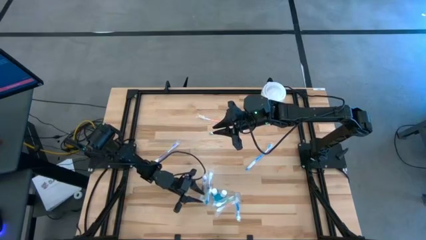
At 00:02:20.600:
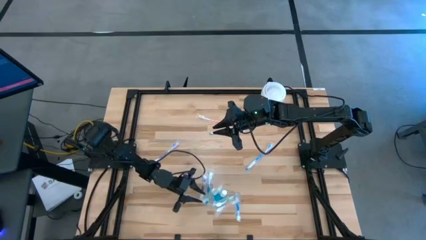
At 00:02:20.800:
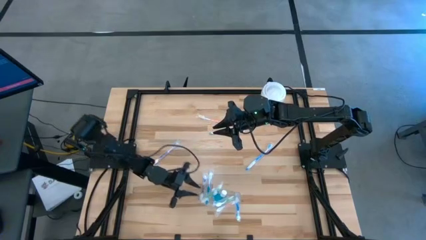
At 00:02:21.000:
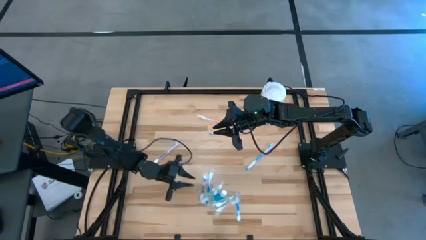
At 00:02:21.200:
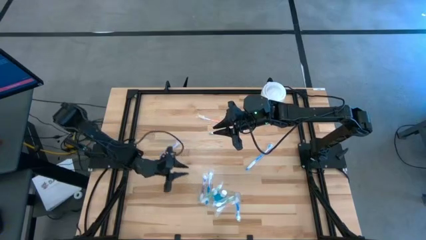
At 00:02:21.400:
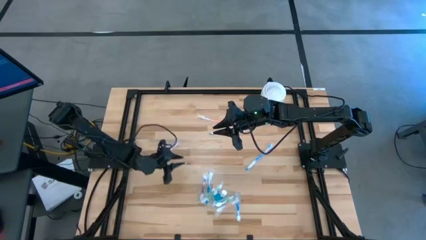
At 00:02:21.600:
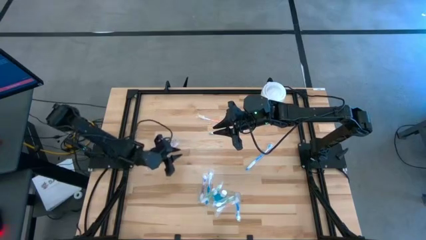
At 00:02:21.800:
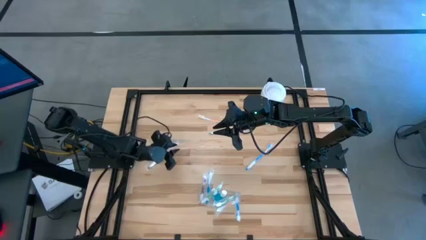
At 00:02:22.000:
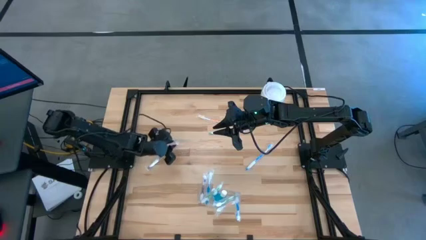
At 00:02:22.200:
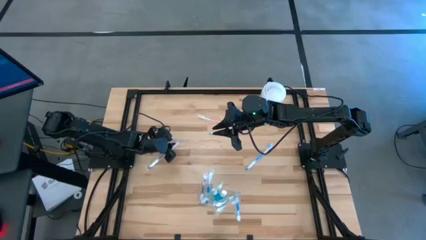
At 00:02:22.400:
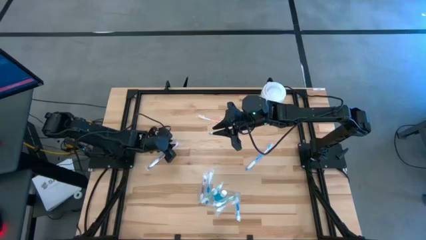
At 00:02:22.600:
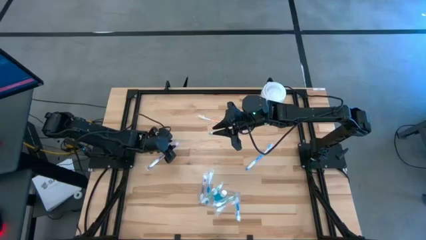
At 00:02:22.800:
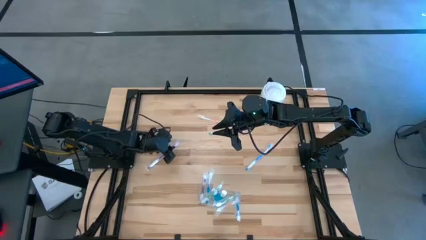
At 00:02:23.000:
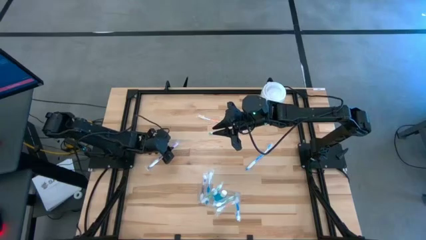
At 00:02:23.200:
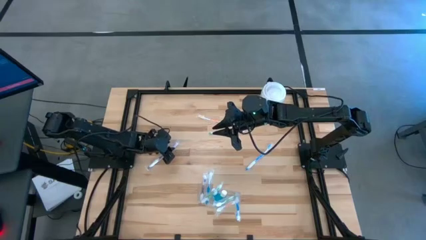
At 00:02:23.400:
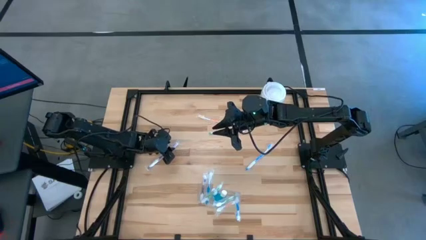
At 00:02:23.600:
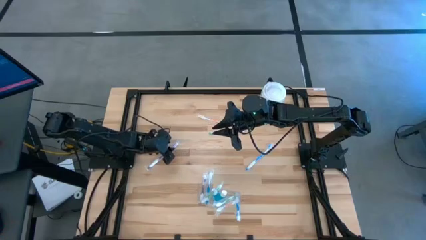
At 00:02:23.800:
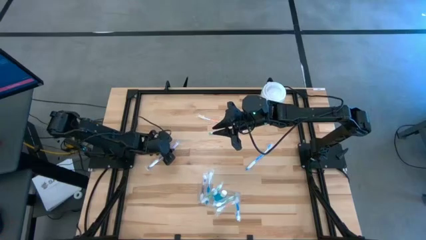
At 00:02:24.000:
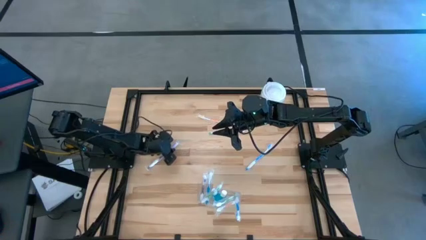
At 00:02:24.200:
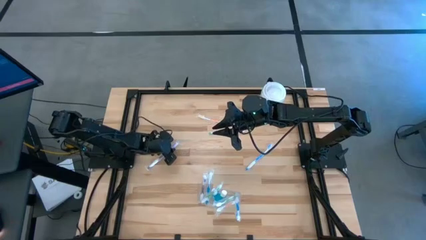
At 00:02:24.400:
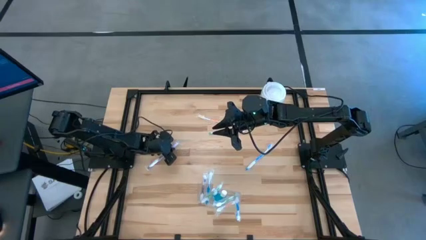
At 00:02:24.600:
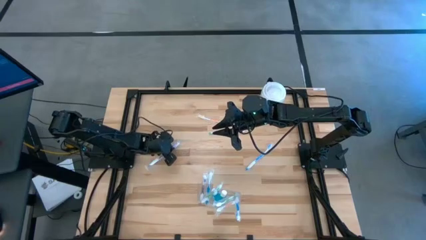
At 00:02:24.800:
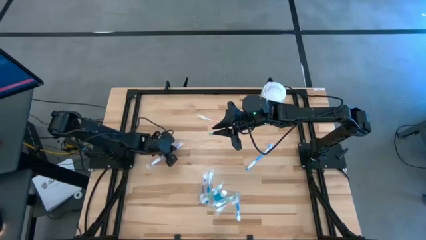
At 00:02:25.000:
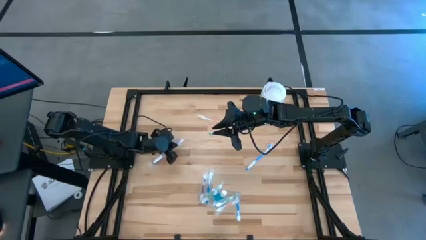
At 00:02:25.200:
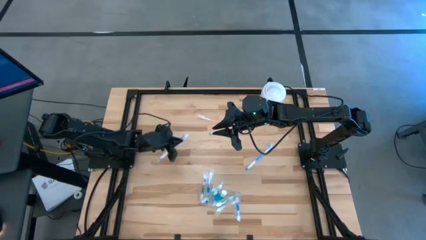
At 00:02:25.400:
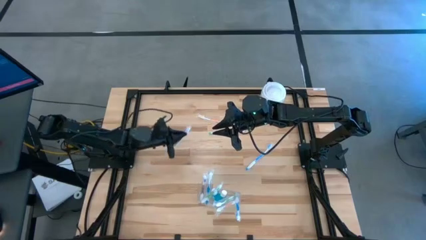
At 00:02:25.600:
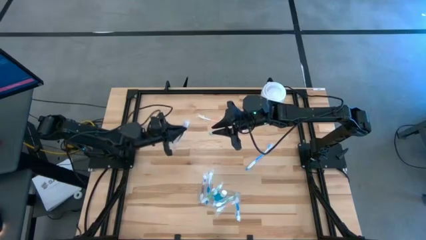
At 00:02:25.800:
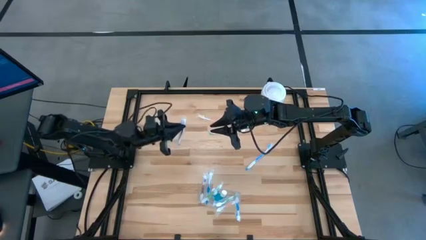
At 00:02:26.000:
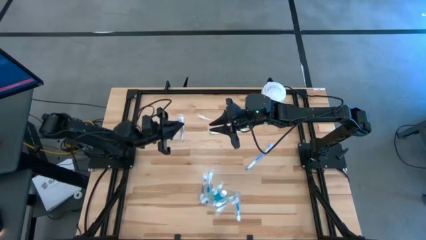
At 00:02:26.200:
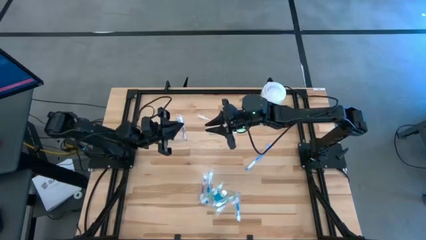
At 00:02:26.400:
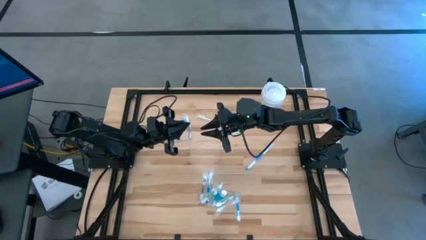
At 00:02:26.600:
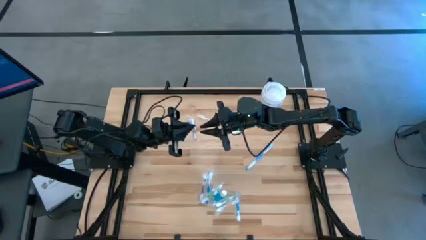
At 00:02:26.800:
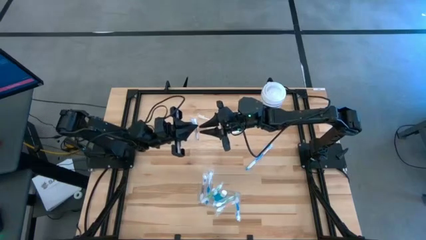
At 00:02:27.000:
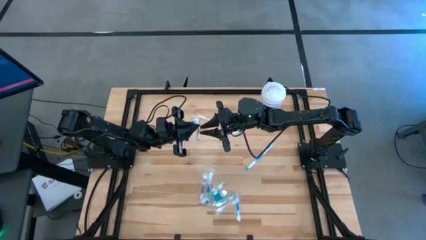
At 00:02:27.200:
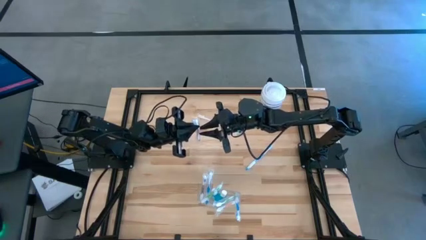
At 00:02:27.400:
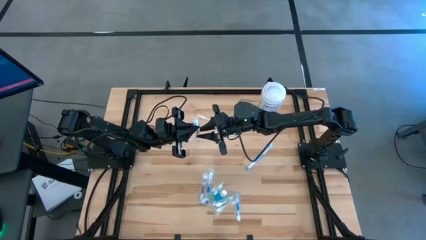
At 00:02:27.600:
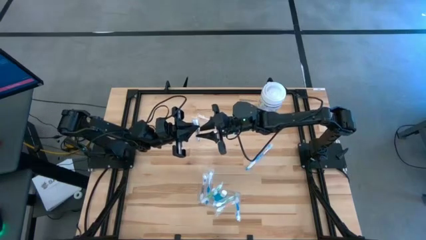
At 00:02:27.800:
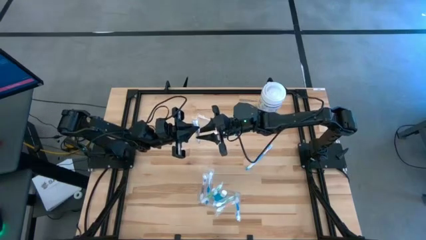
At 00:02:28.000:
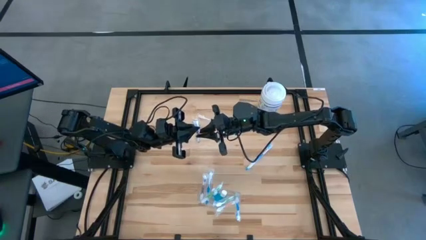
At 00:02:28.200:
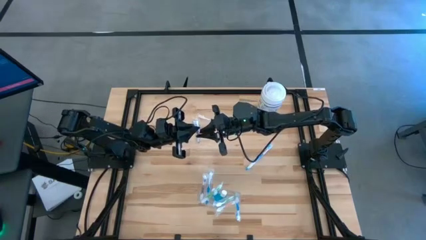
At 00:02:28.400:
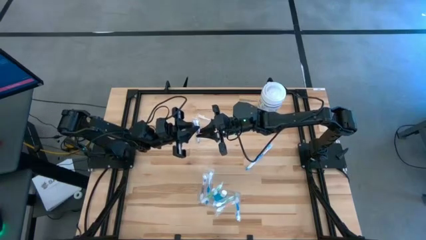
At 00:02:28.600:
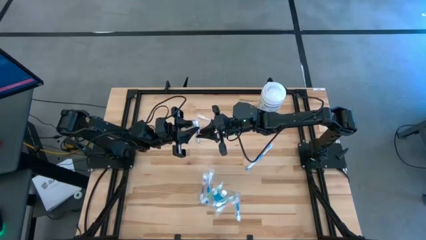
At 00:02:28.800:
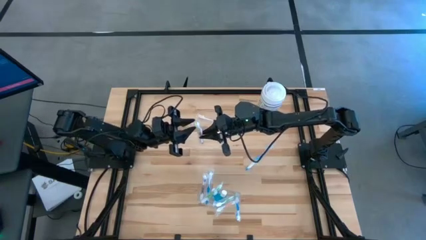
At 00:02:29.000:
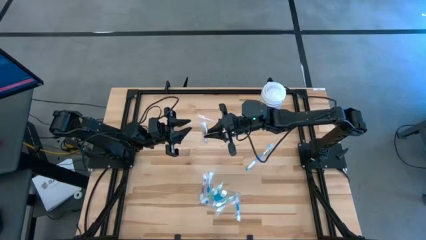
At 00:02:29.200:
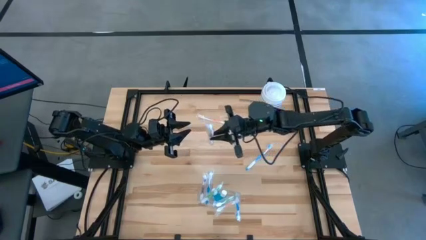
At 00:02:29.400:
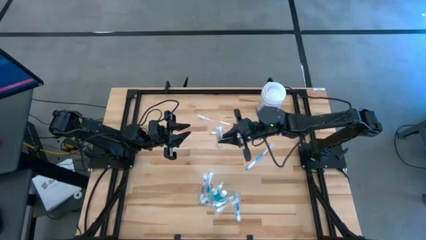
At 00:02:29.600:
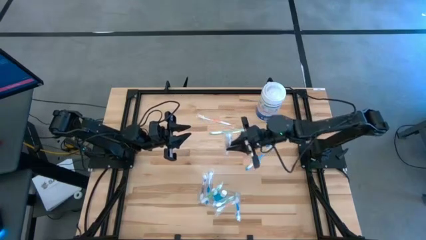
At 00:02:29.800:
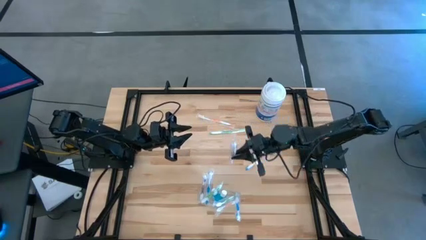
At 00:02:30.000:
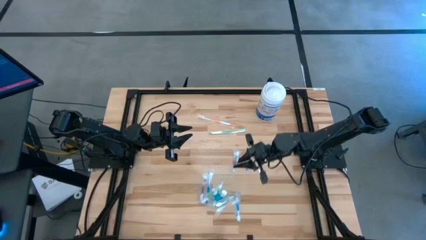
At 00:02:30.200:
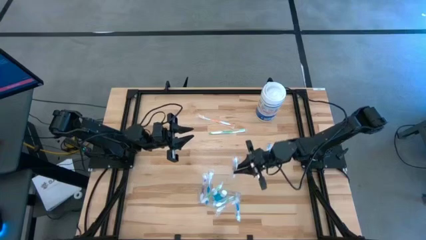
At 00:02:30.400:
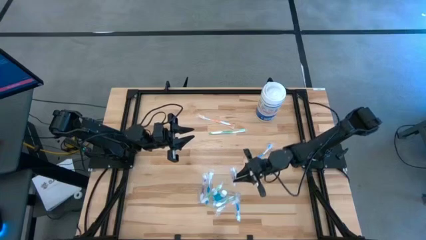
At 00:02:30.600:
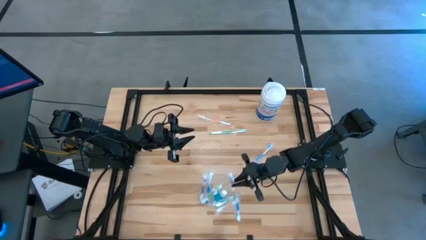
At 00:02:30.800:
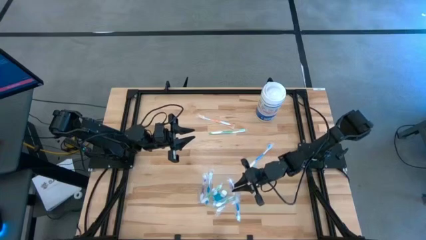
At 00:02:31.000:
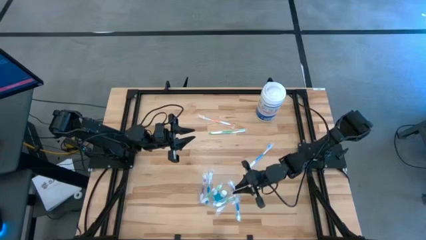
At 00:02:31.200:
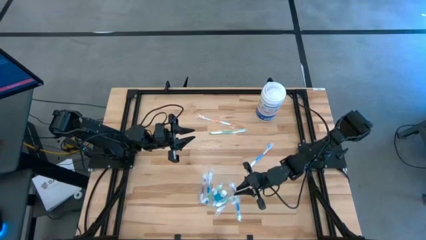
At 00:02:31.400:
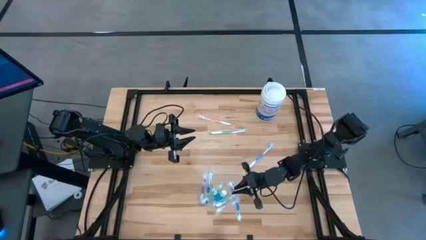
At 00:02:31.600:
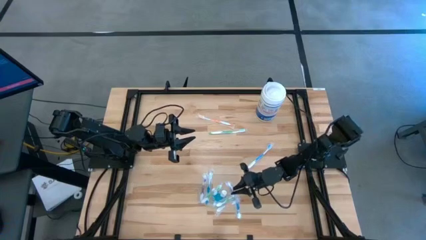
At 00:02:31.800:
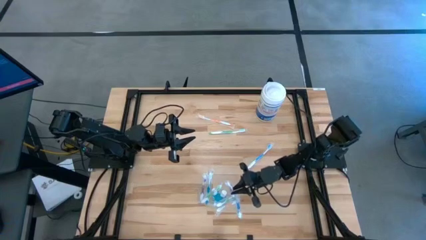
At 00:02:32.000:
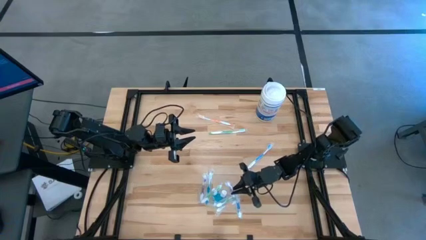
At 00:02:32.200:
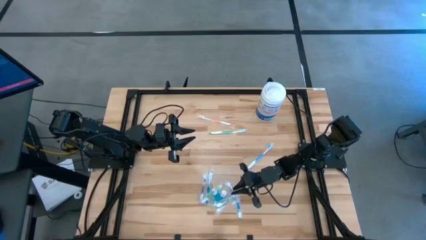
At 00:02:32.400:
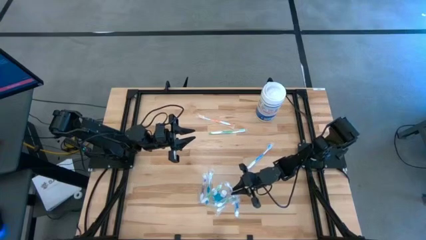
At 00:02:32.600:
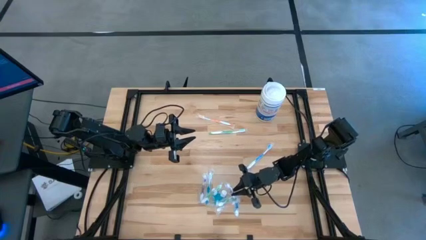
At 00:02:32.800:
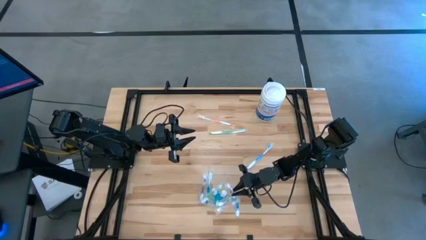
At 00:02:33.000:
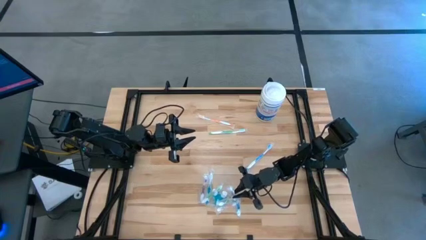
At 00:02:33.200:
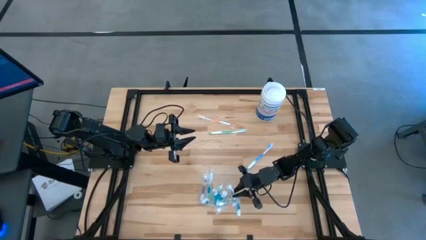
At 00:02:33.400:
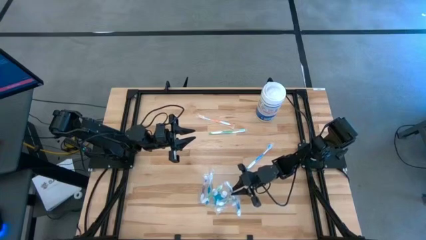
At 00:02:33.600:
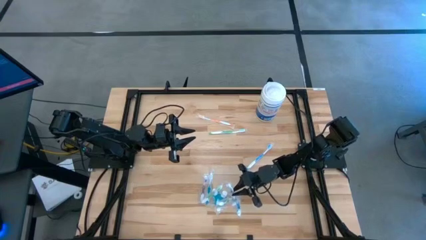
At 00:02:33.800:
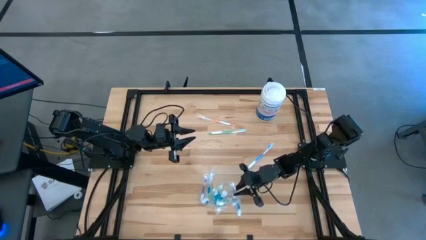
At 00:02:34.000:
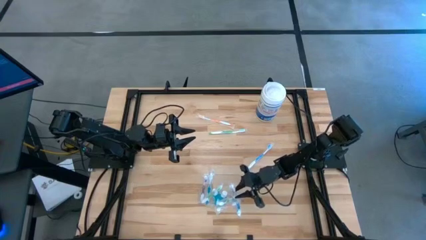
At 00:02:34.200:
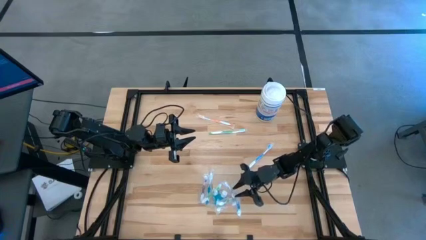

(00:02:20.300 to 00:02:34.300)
Task: Pick & Place toothbrushing station
Put the purple toothbrush into the transparent organizer

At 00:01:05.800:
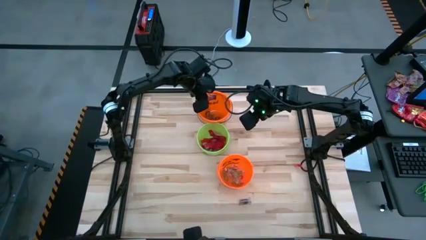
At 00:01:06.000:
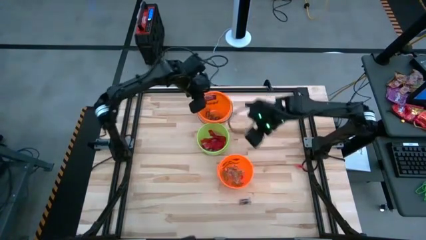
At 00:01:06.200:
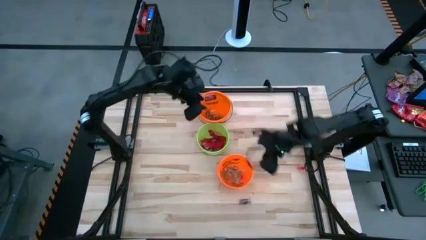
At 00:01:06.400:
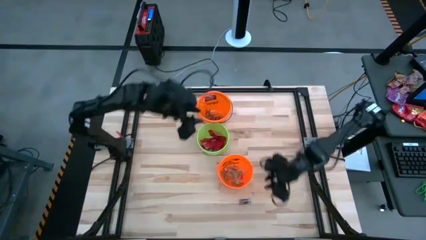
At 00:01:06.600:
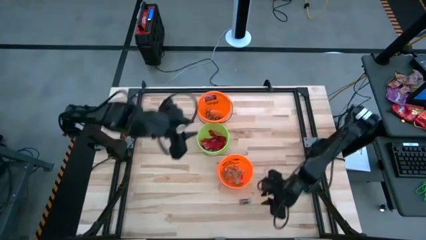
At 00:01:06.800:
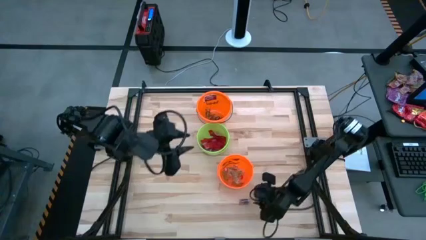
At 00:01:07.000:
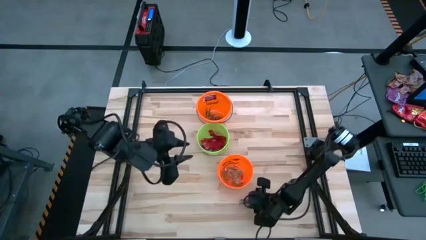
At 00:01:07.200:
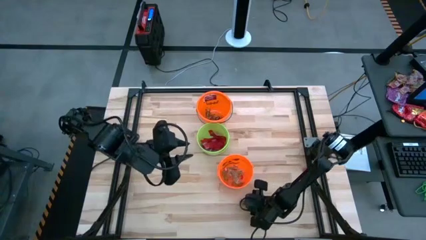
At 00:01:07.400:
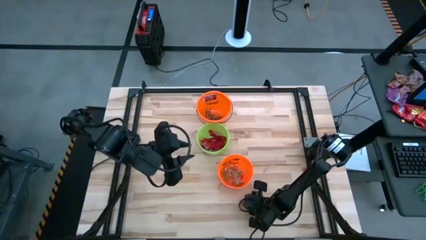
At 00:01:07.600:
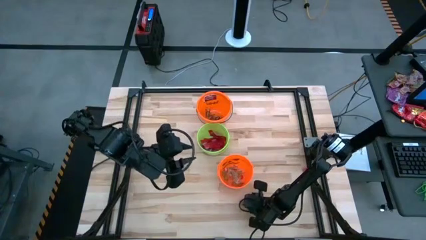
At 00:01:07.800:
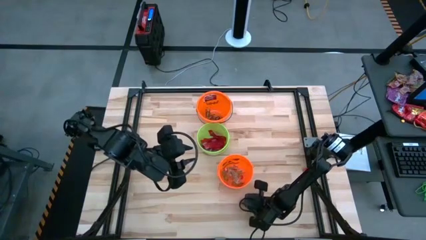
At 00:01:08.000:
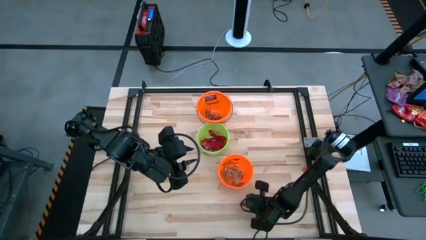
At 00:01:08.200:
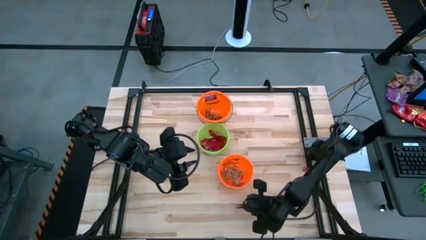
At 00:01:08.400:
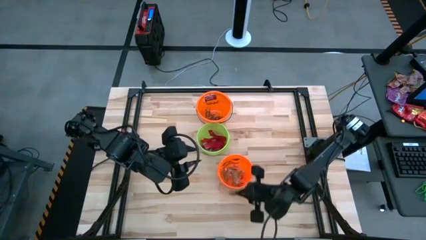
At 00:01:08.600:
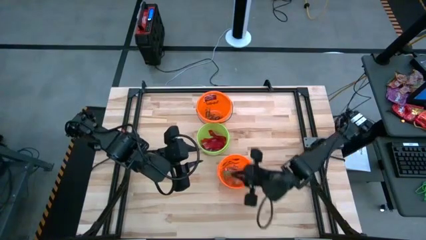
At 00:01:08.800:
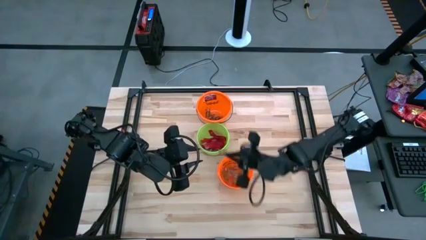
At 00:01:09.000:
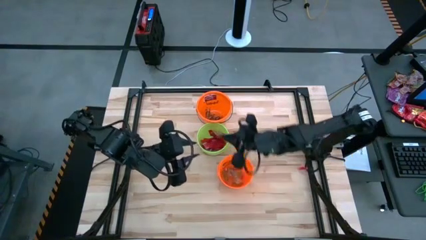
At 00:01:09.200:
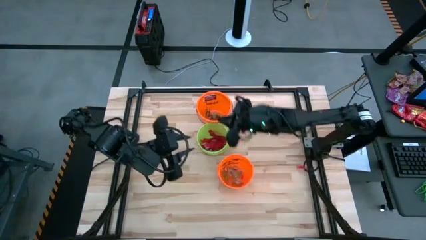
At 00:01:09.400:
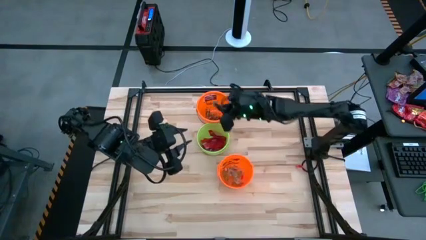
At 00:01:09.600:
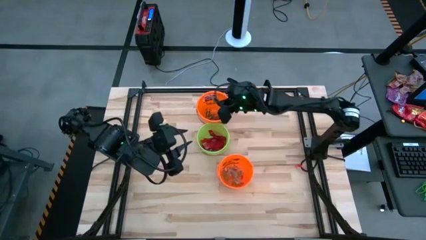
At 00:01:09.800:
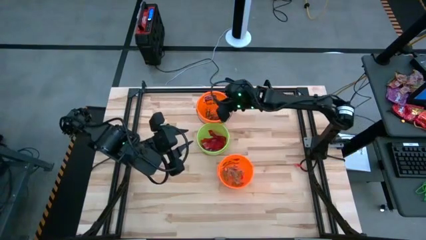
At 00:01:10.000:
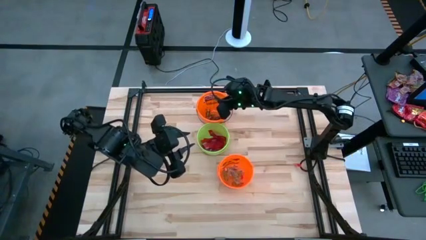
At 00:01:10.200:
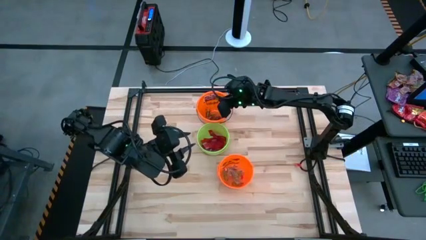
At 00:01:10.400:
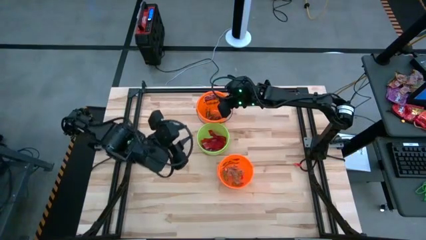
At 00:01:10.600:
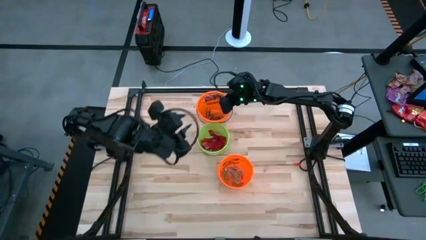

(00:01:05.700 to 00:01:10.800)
Task: Sort candy by brand, put in halloween buckets
Put the black gummy into the top orange bucket
